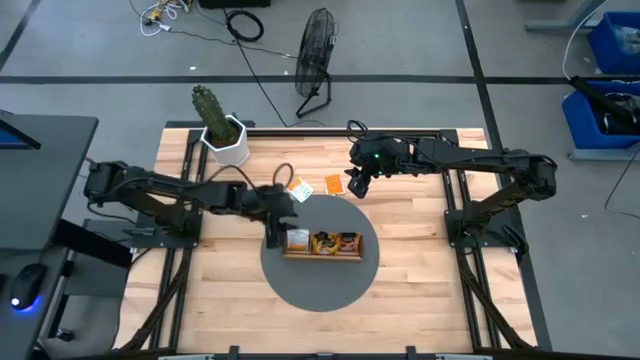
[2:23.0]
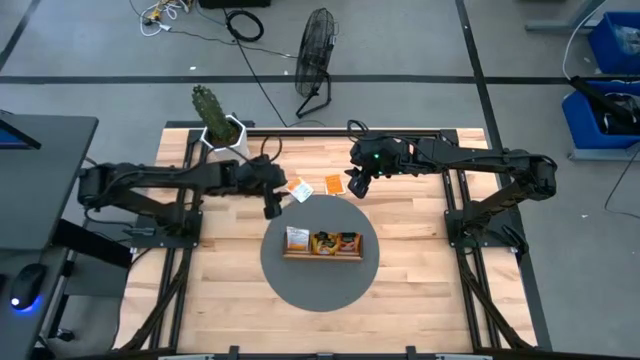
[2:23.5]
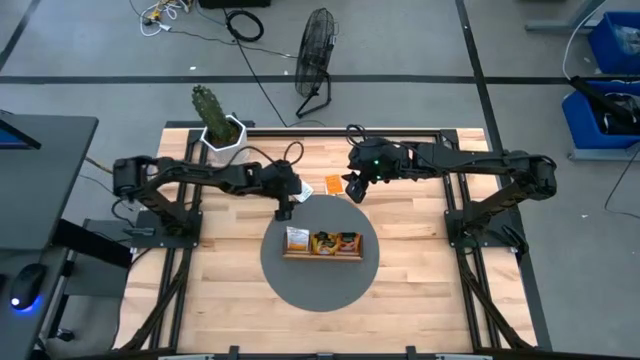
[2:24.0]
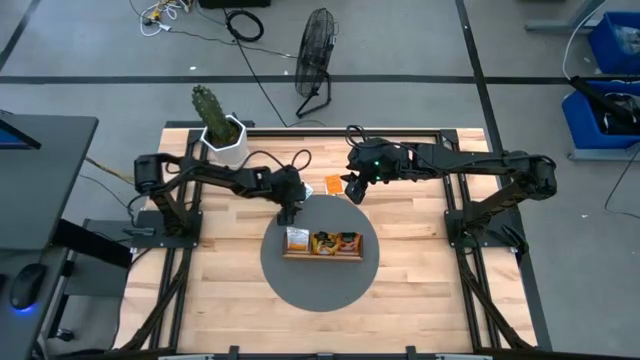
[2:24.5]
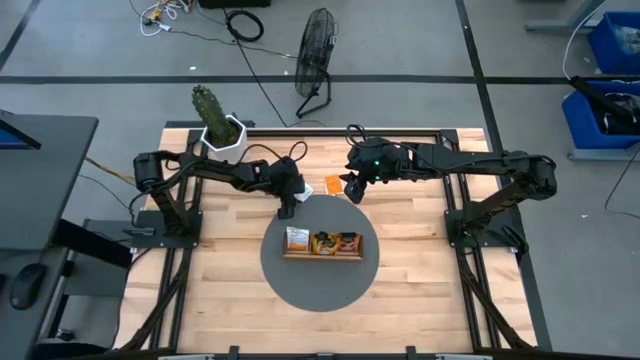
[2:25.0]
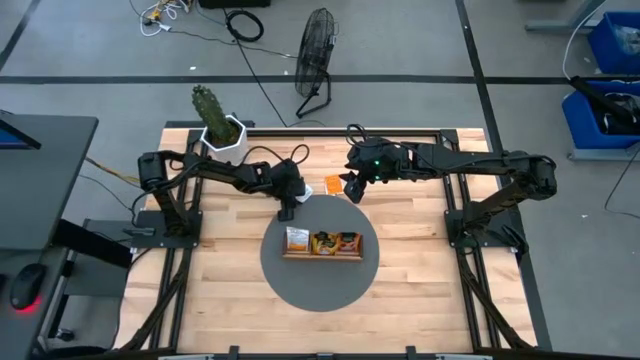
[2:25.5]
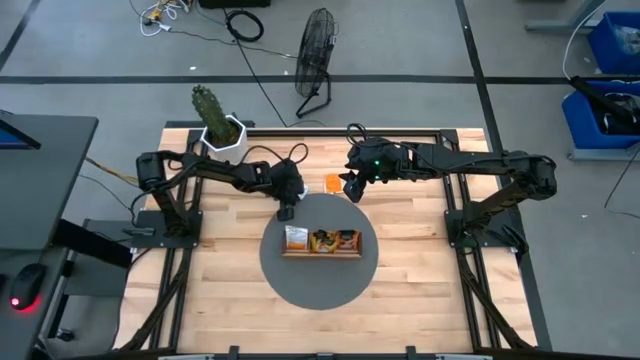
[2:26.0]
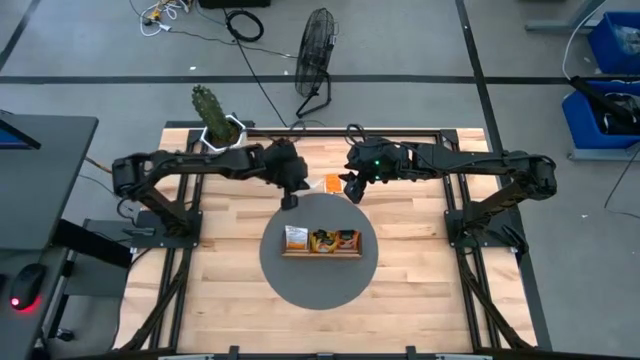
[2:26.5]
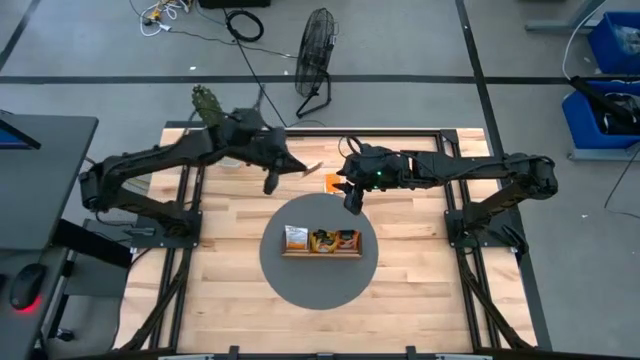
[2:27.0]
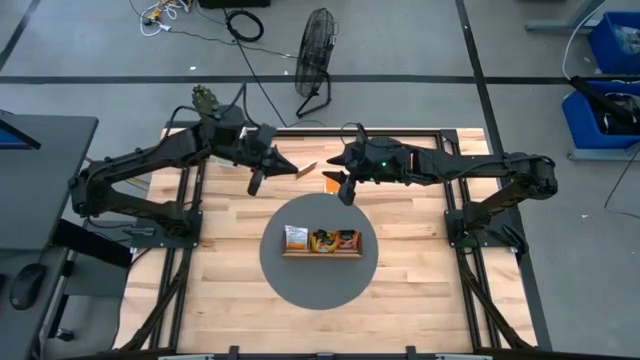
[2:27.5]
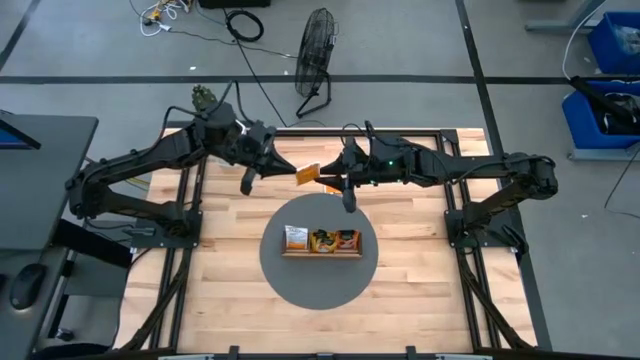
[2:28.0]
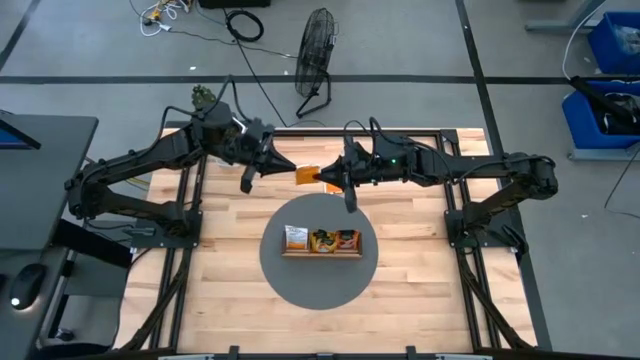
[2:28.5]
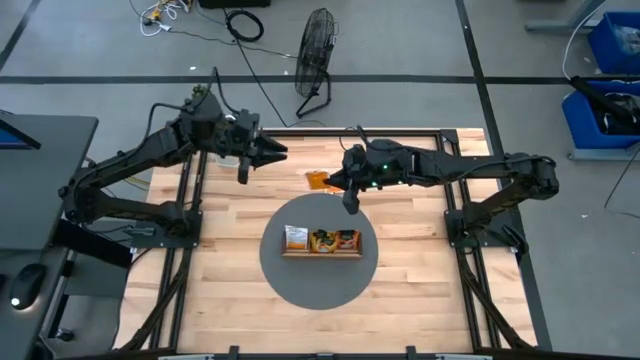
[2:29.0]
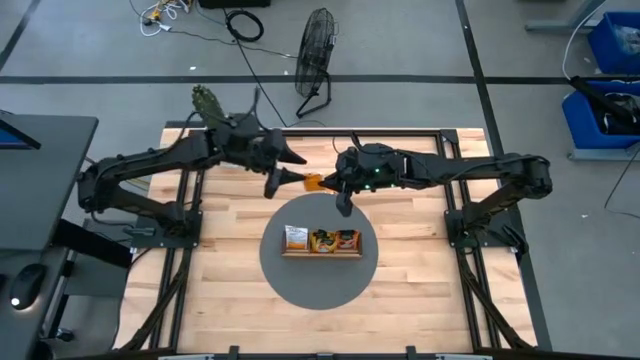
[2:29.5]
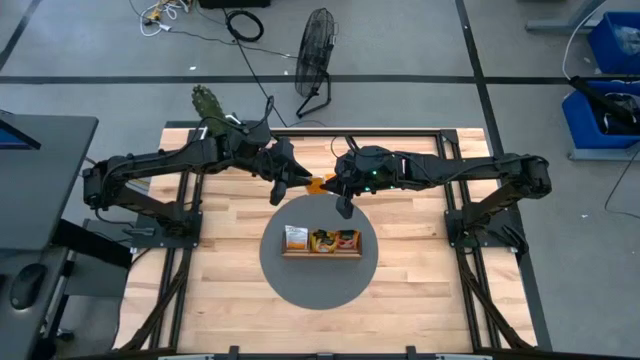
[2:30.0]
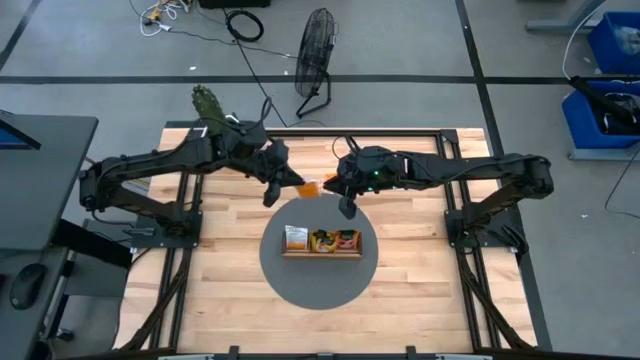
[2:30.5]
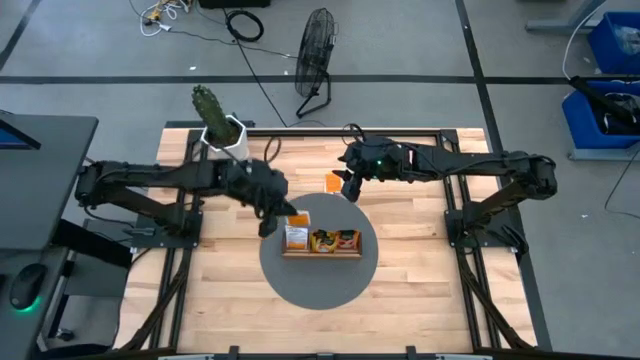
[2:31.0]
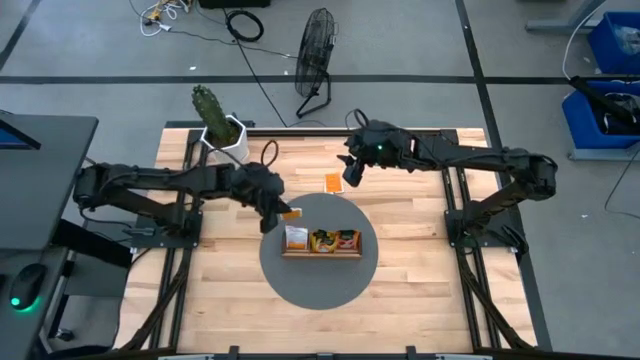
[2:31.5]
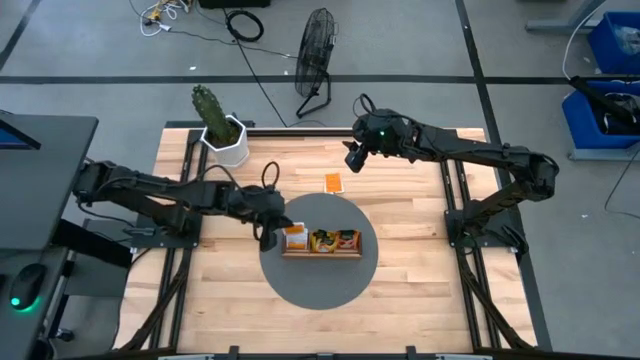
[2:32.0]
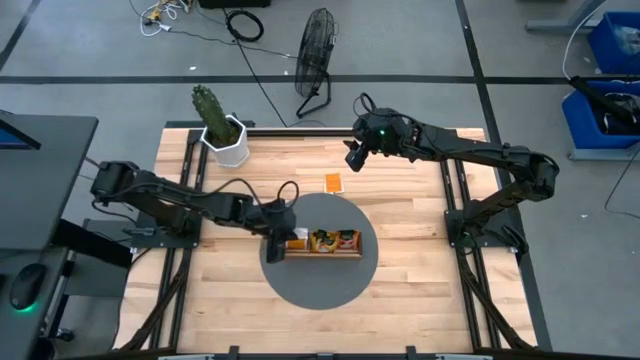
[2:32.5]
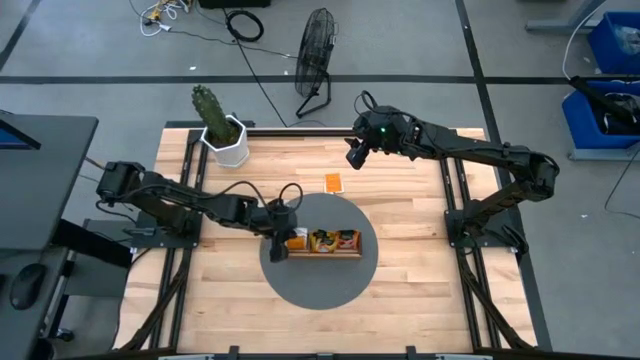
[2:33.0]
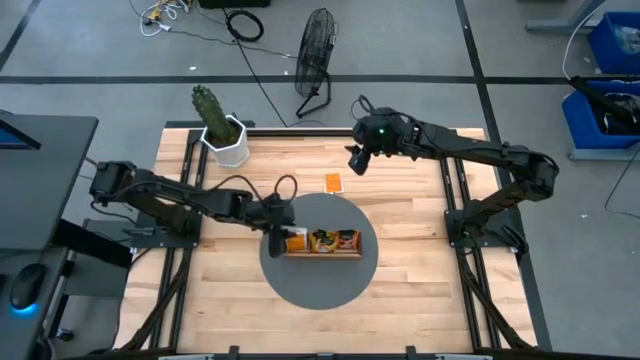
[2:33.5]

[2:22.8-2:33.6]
Task: Pick & Place Tea
Put the white orange tea bag into the left section of the wooden organizer

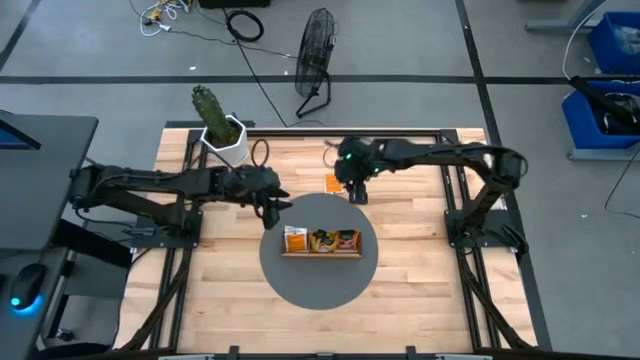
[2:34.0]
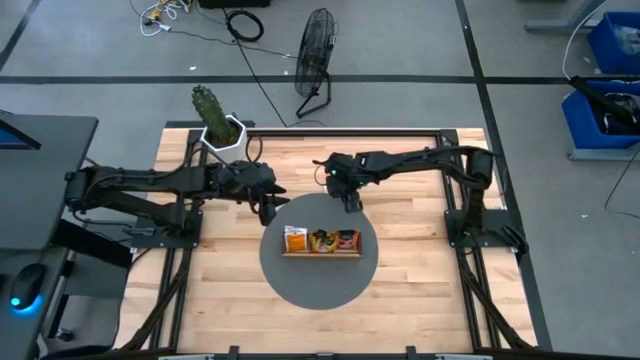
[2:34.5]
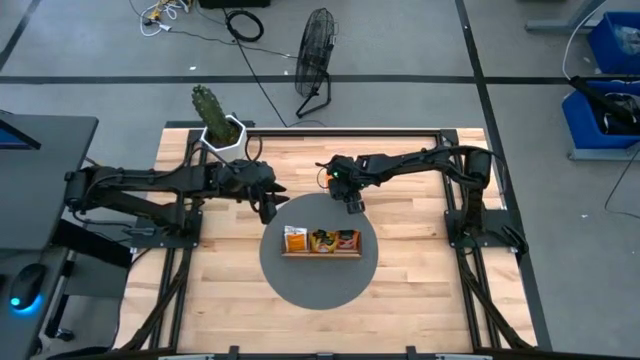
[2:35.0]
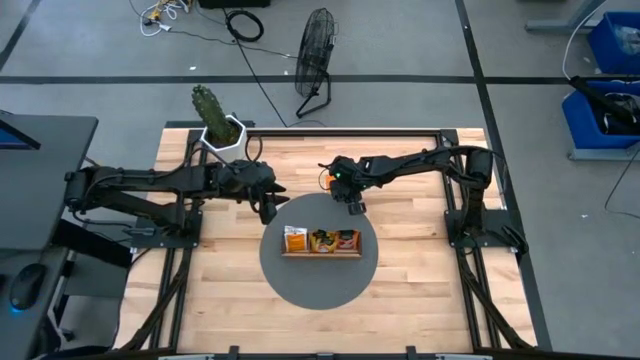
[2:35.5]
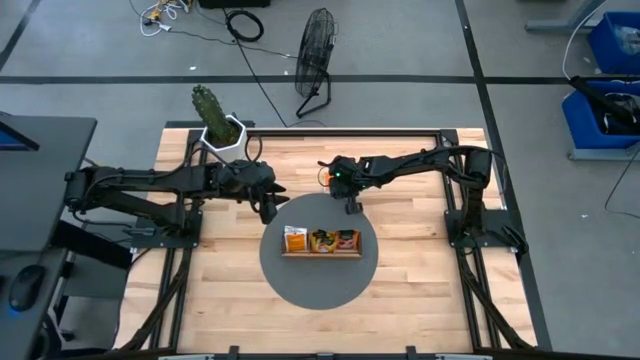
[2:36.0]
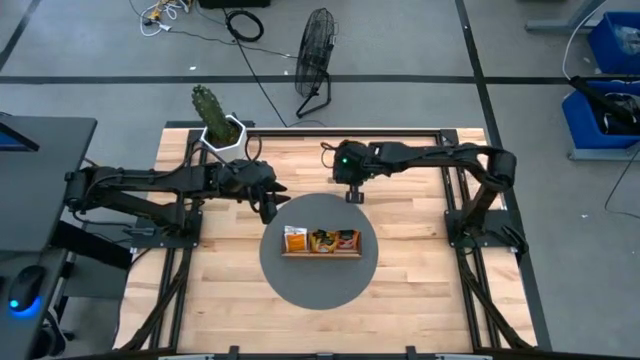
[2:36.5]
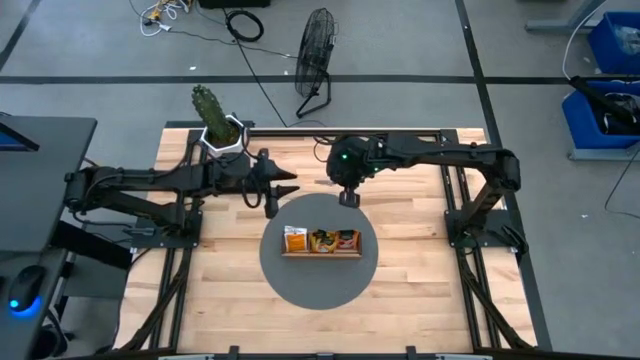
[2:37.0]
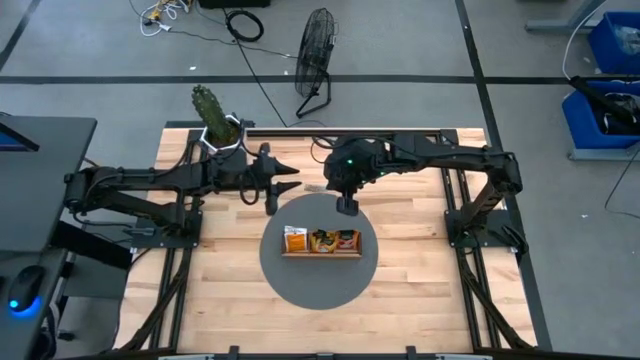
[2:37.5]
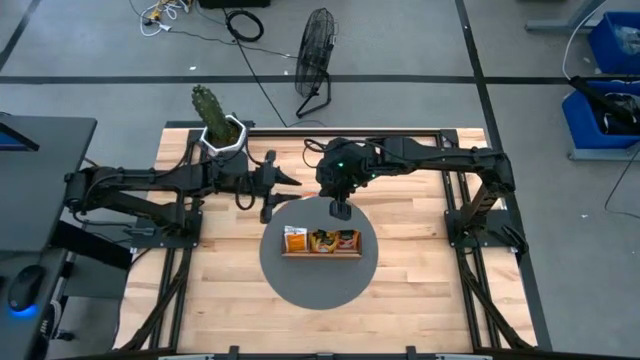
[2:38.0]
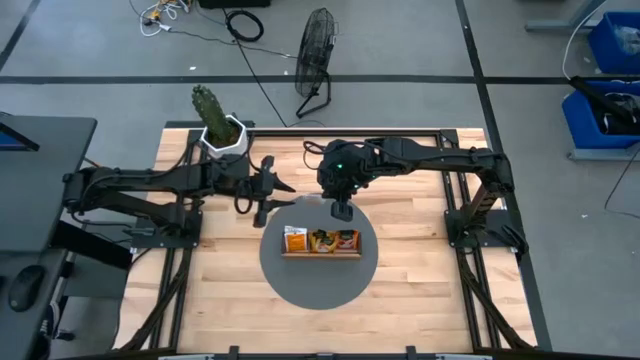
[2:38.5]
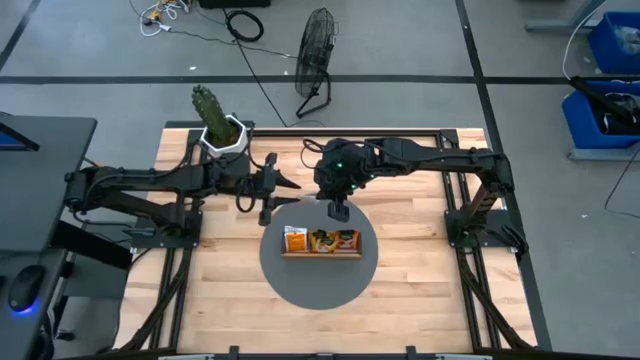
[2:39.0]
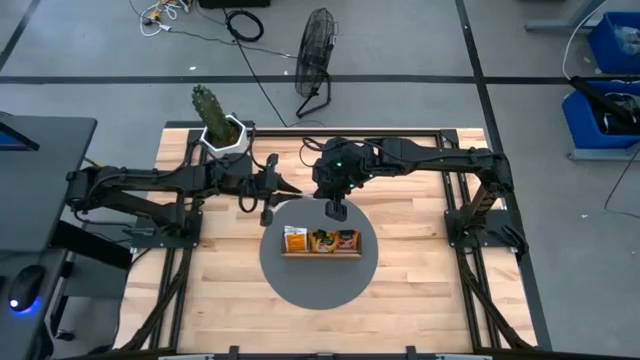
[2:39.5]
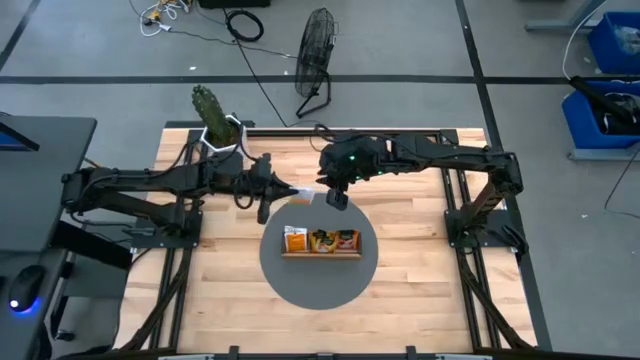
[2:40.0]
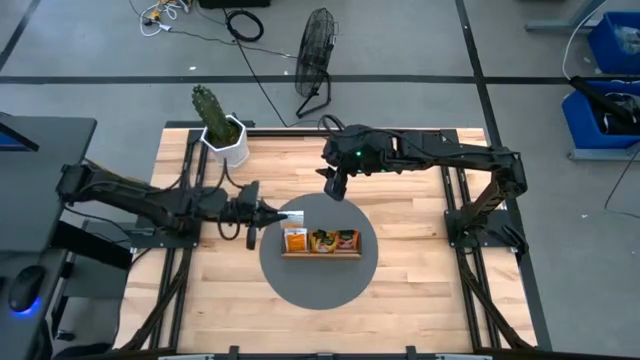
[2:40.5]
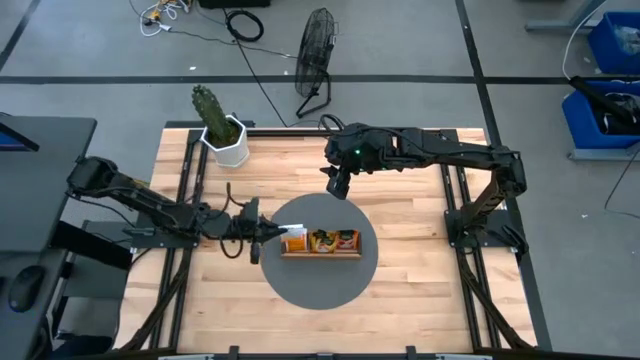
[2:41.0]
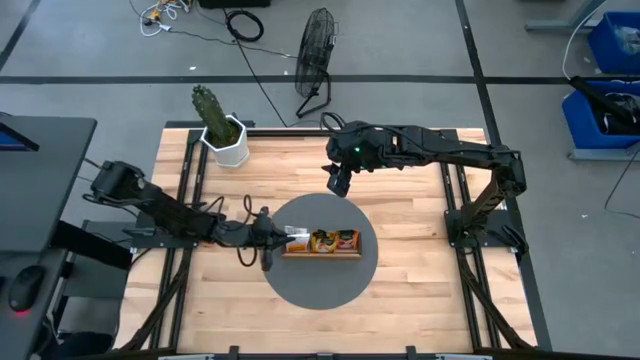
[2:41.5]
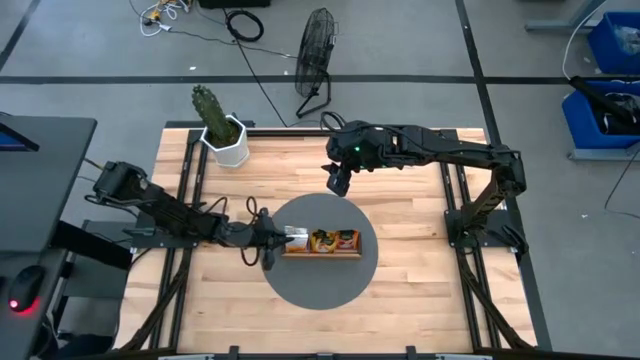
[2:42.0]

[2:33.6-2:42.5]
Put the white orange tea bag into the left section of the wooden organizer

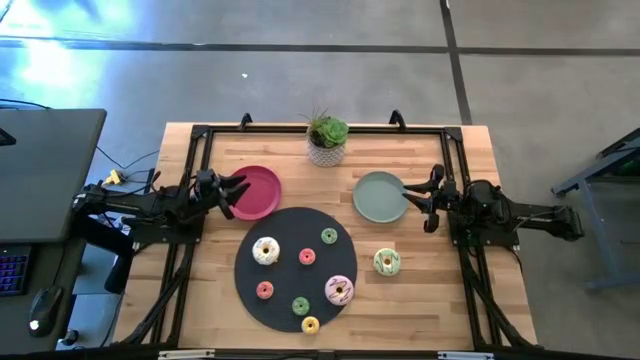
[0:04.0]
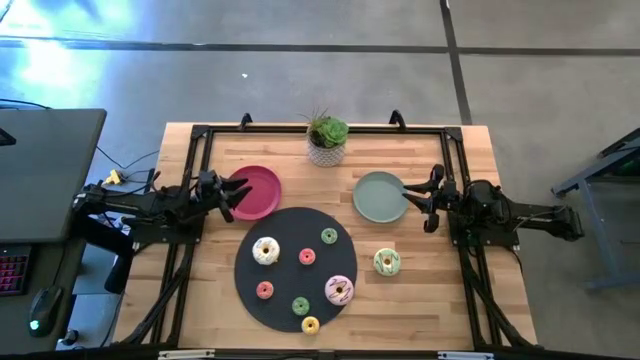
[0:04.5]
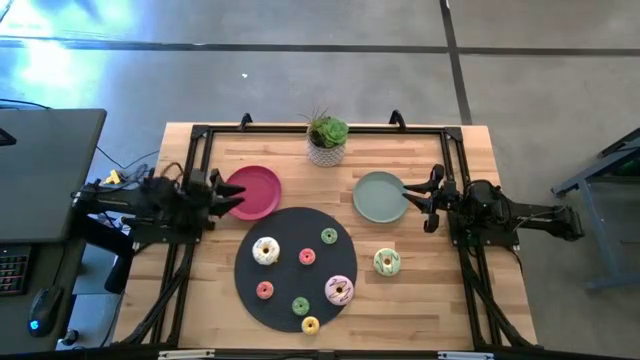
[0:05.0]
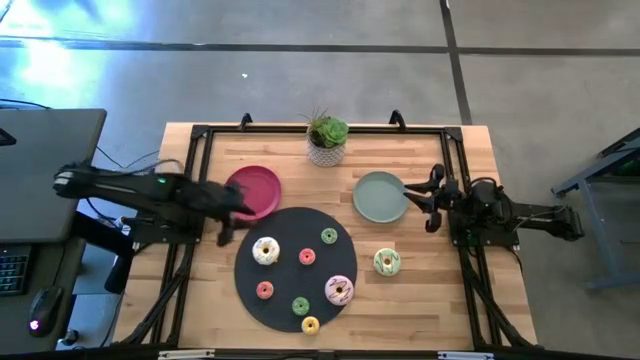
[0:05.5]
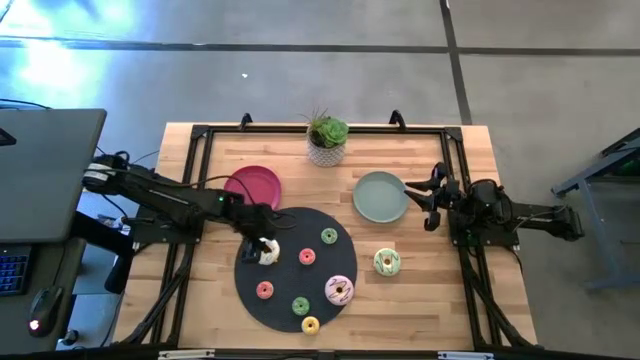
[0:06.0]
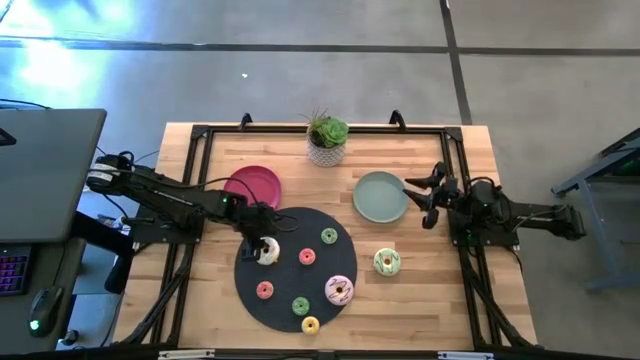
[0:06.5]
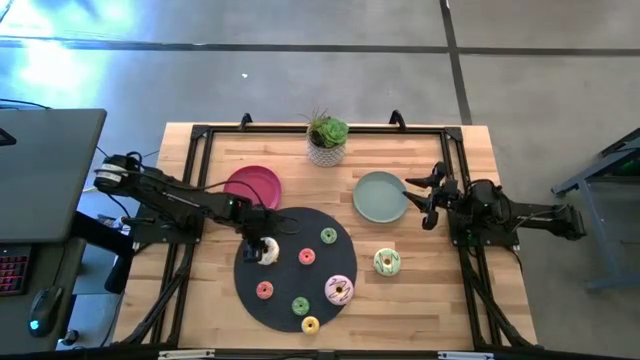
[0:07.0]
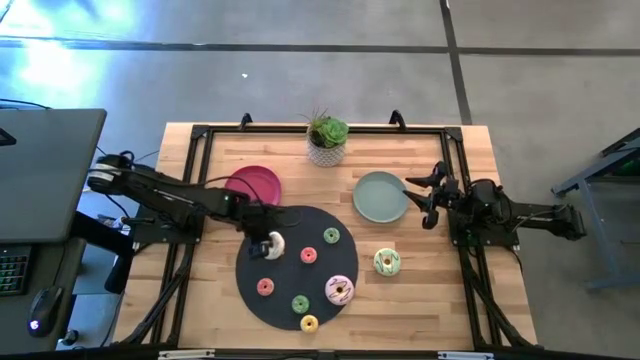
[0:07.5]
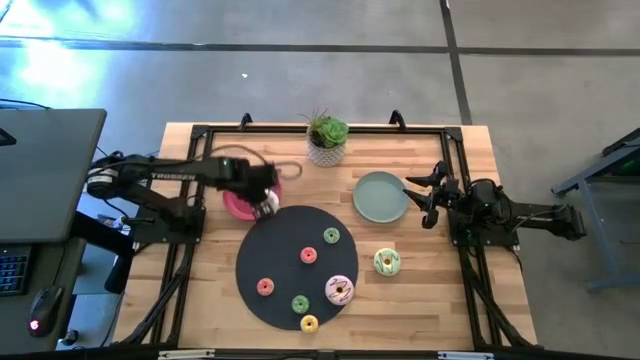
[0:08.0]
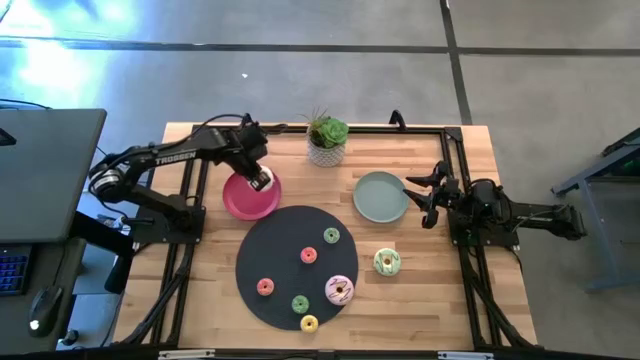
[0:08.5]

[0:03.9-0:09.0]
Task: Pick & Place donuts
Put the big white donut on the red plate
